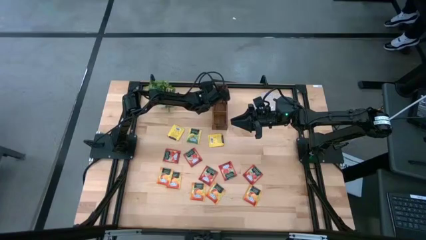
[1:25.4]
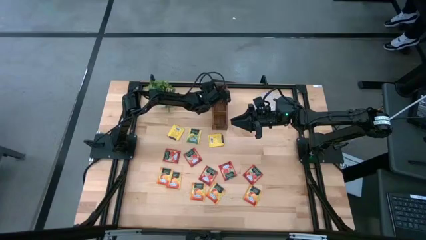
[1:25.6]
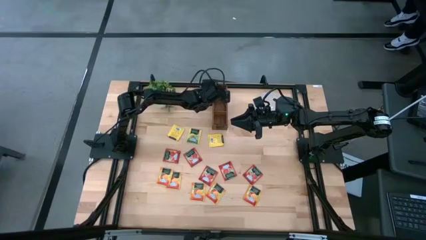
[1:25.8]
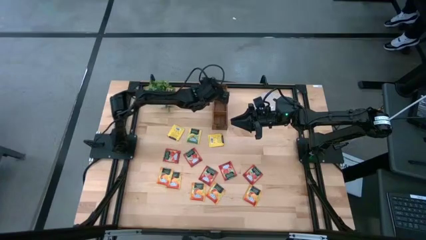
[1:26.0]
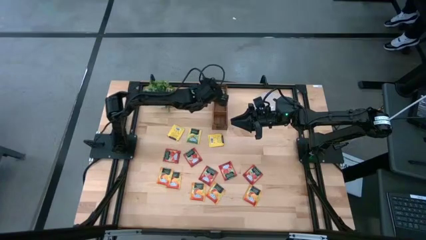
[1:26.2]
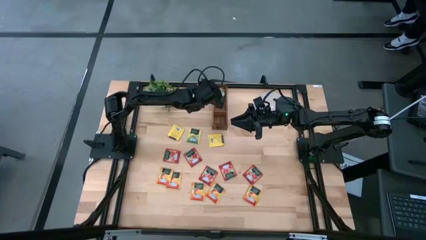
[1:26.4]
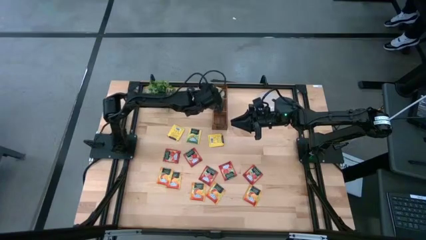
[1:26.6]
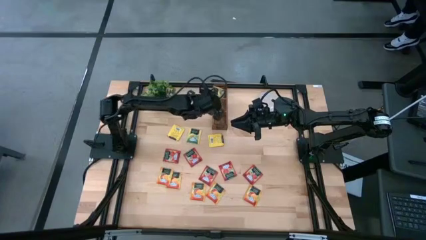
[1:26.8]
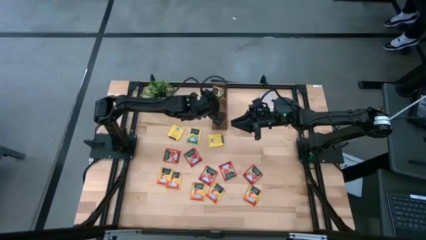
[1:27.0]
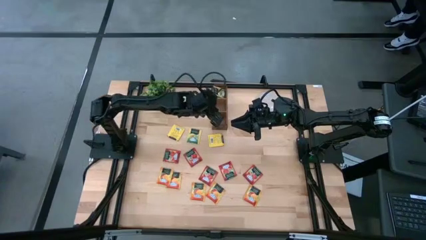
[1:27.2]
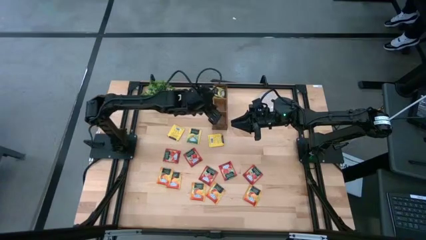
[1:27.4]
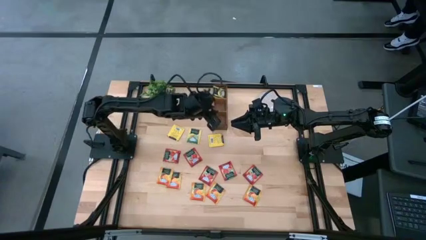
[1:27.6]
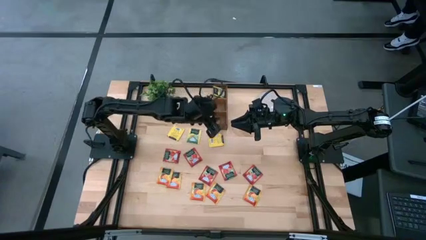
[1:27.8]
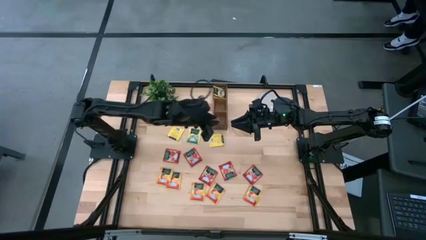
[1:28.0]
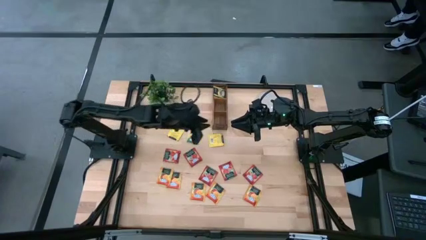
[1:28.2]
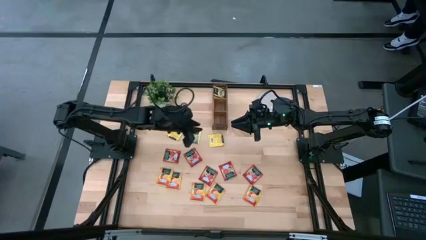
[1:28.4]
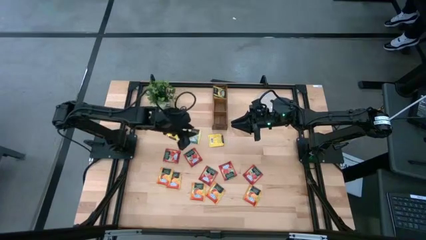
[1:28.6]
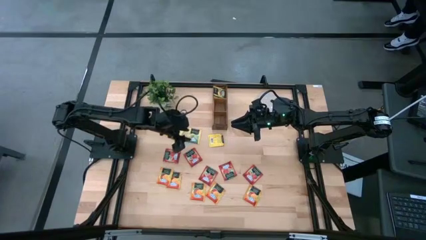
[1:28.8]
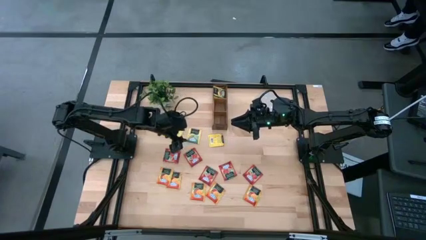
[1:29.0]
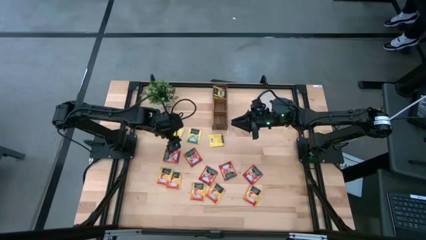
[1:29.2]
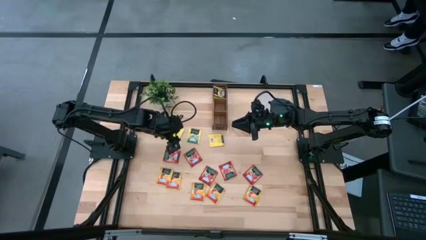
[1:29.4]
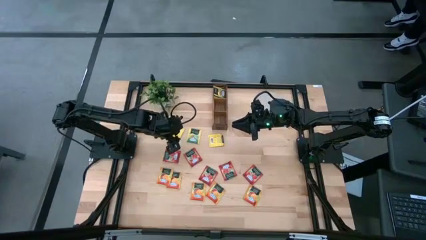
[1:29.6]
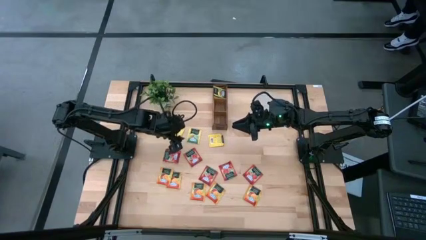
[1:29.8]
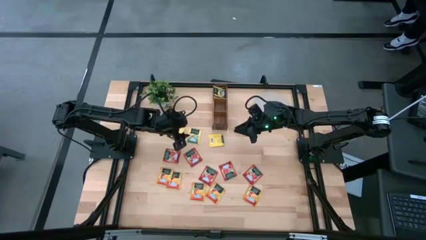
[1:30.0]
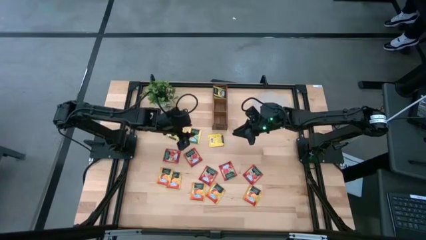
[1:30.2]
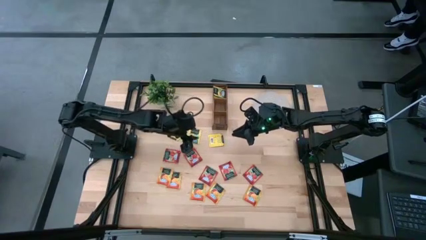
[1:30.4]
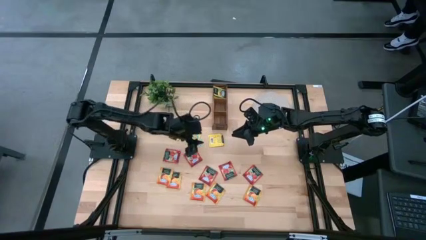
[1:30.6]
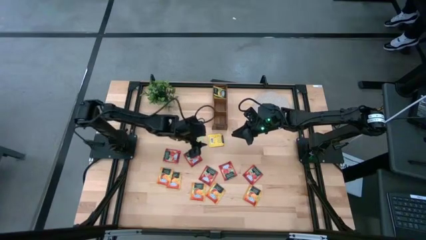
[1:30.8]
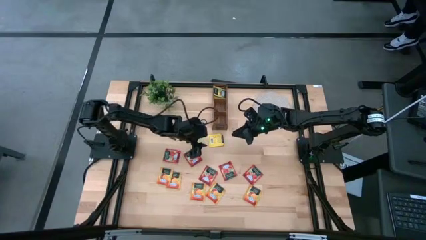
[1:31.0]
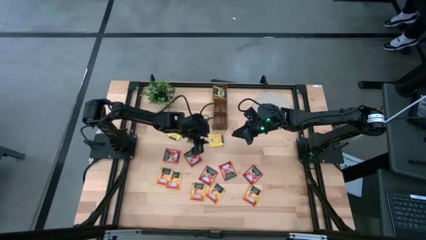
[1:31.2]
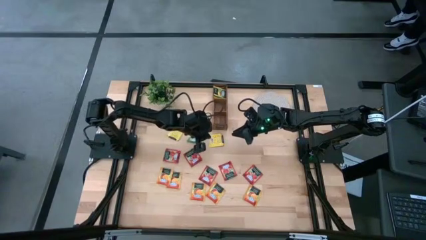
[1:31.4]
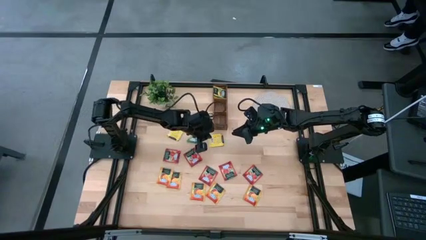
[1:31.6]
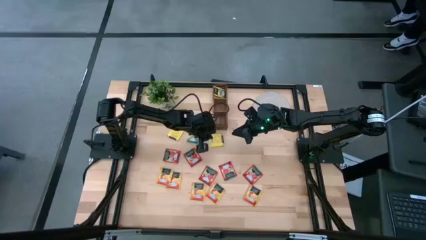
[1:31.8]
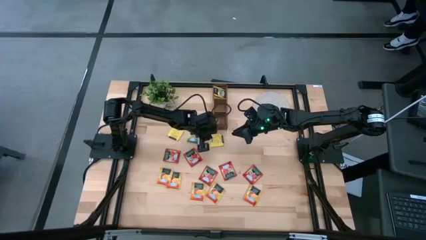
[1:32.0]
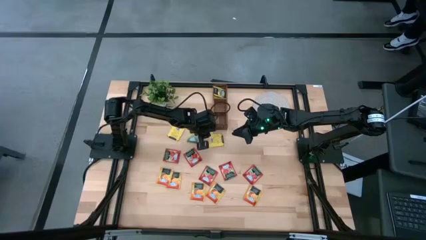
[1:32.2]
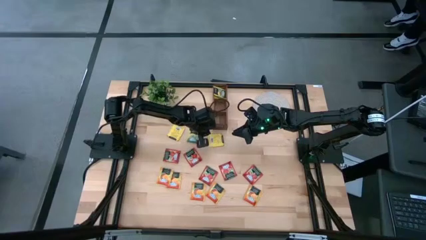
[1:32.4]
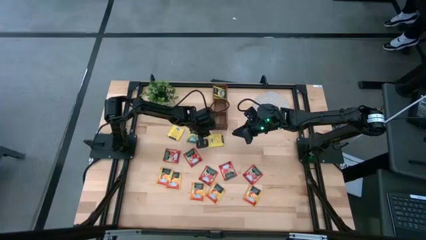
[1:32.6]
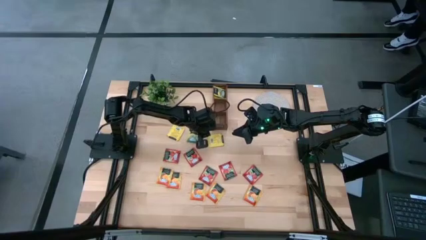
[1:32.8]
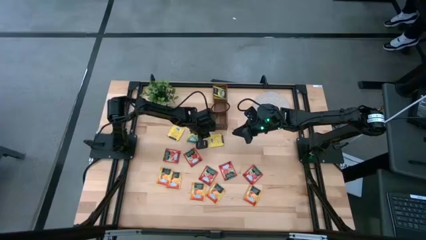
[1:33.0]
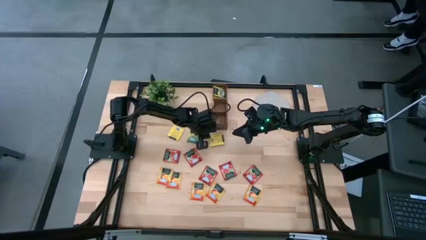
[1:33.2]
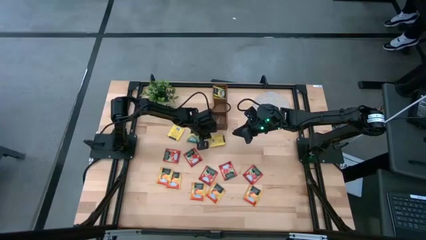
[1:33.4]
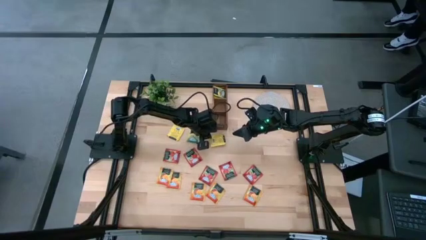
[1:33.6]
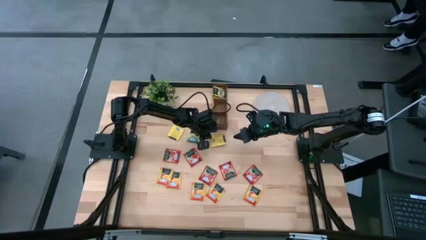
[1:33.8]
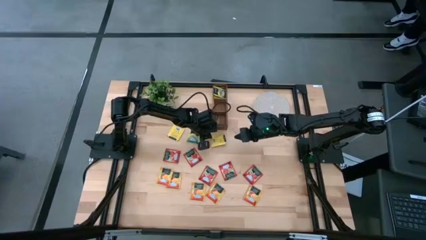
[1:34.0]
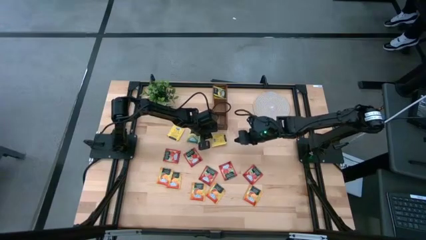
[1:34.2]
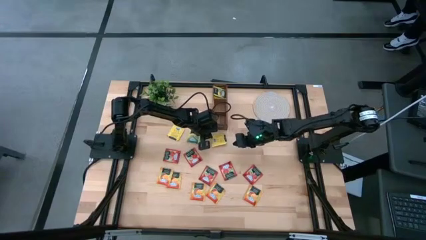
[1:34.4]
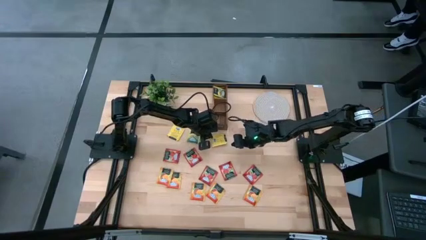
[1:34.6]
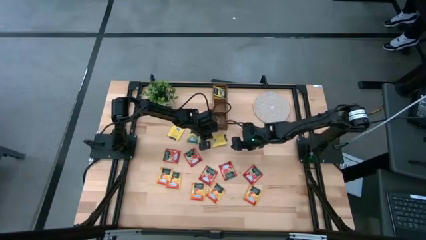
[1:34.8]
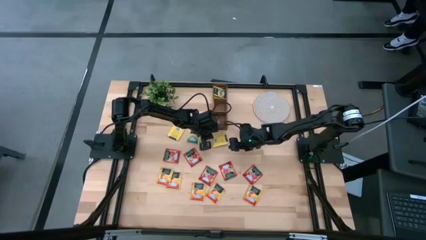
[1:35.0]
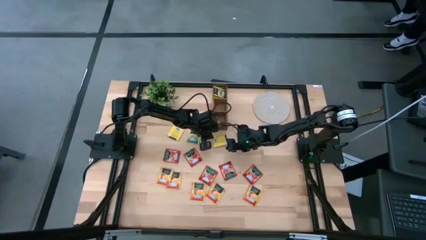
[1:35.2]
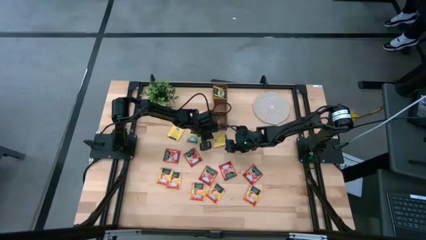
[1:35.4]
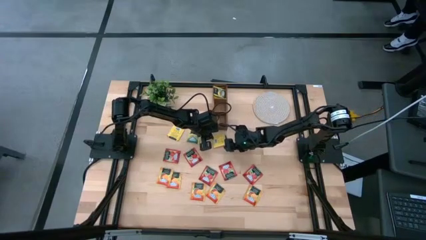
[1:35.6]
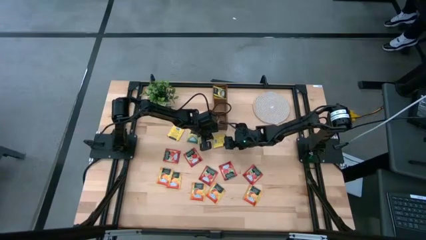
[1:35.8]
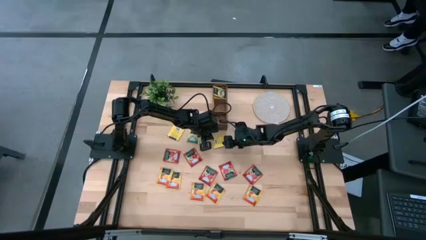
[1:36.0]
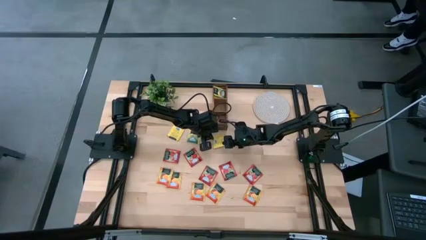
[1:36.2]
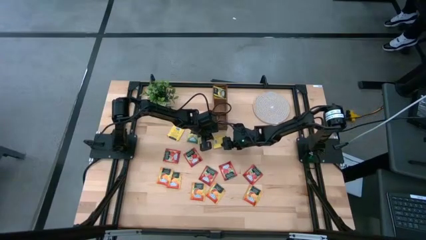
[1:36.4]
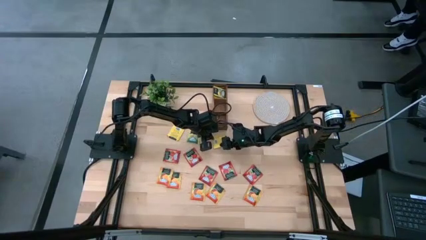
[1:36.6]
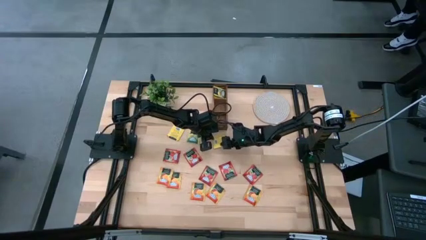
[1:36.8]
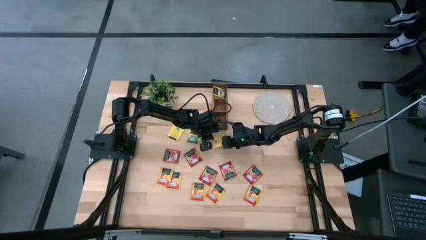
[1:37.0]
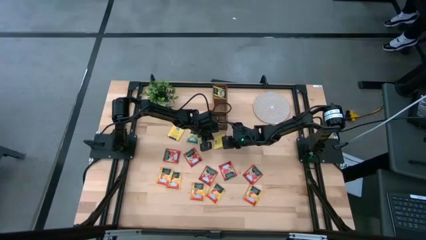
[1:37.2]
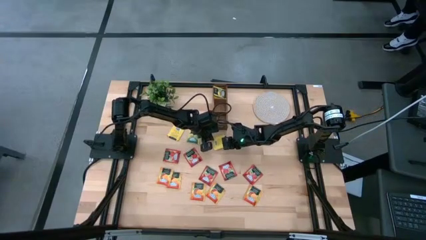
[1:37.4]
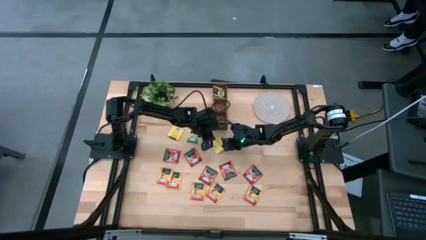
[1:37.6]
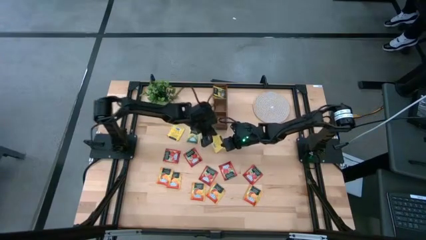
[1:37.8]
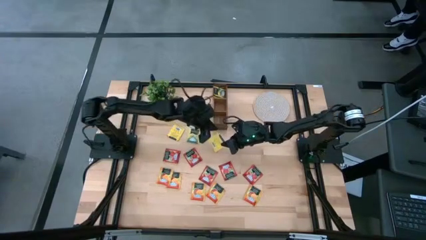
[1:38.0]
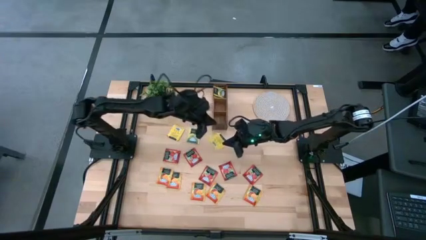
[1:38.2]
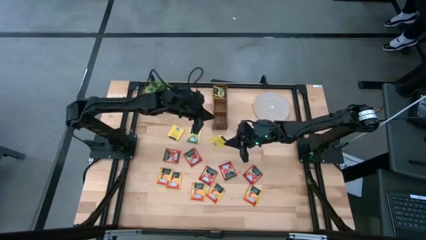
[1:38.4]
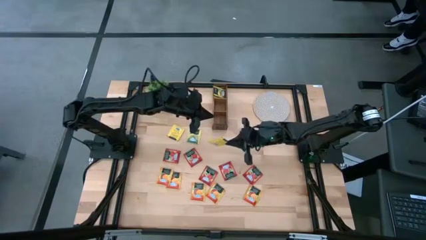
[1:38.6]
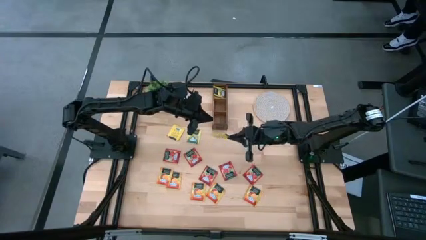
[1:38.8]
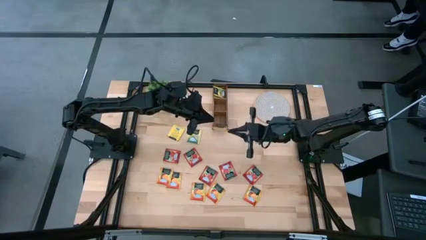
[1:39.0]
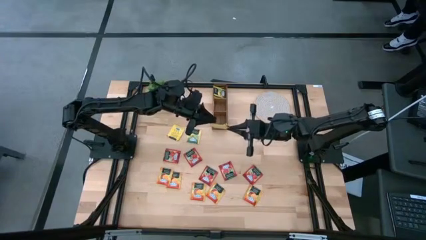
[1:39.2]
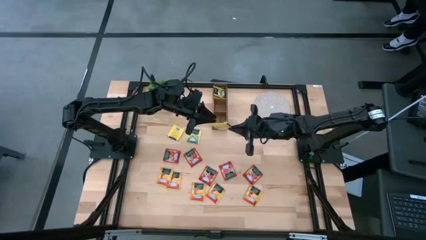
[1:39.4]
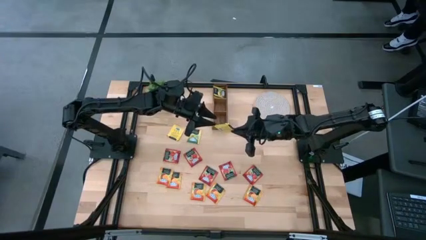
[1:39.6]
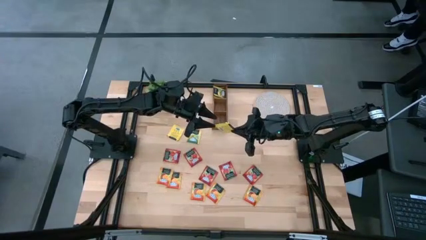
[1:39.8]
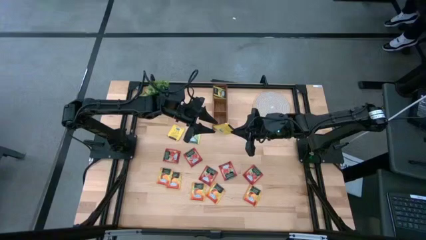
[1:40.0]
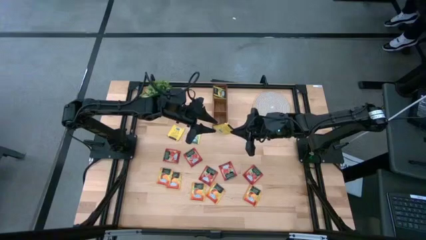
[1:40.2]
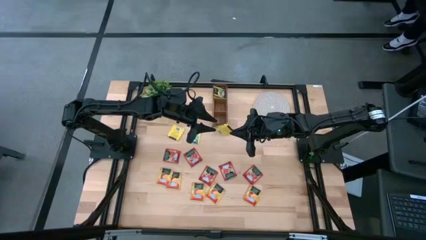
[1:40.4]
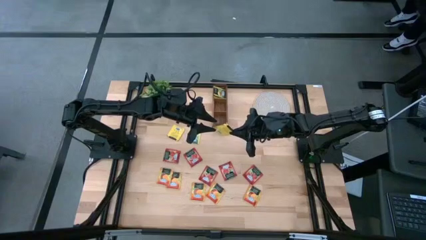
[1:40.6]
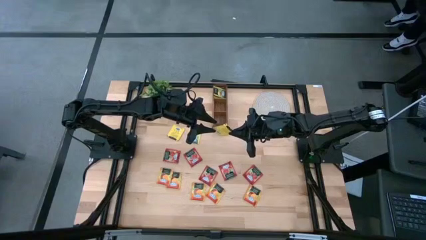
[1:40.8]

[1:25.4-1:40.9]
Task: Pick & Place Tea
Put the yellow tea bag into the left section of the wooden organizer

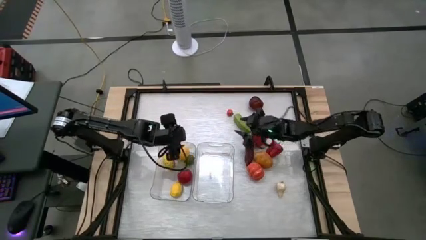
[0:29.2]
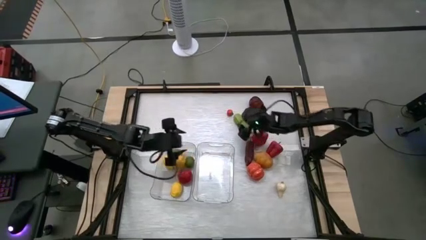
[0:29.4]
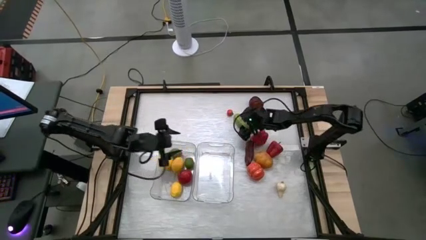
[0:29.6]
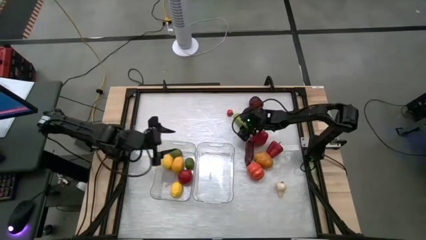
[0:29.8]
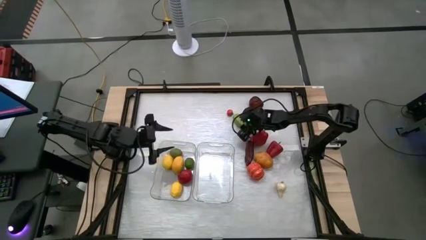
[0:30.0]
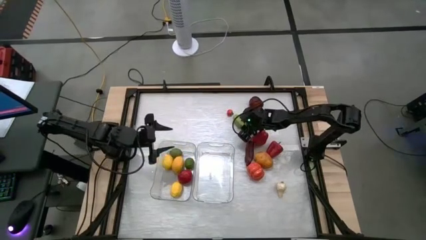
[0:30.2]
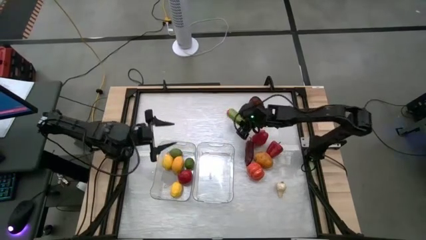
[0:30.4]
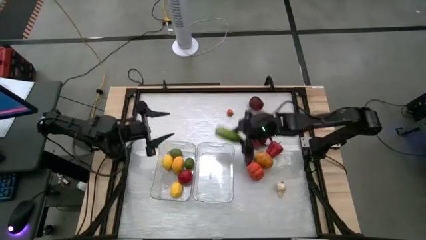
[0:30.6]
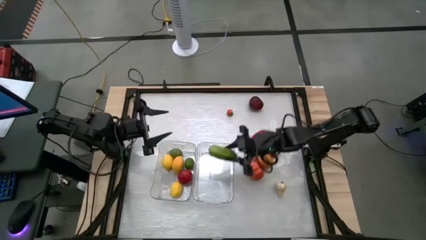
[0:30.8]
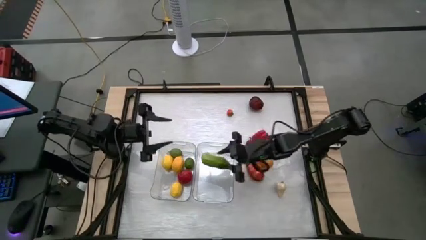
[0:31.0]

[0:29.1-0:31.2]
Task: Sort produce into baskets
Put the cucumber into the right transparent bin
